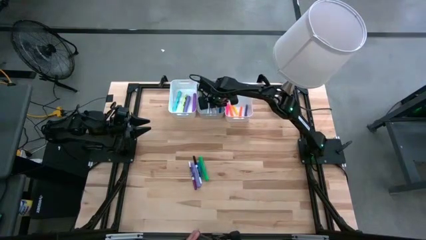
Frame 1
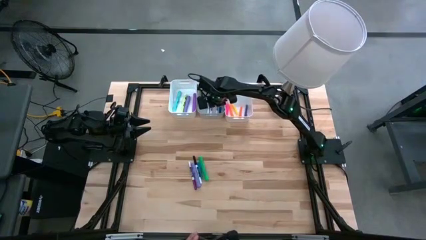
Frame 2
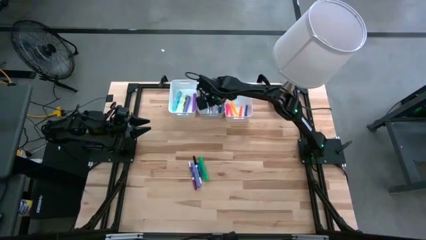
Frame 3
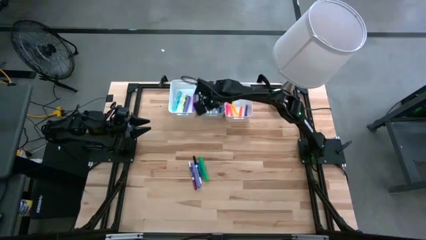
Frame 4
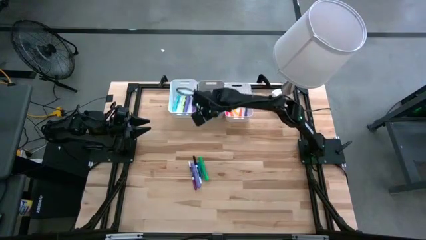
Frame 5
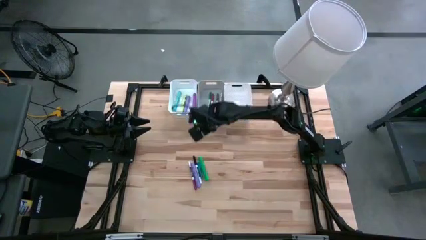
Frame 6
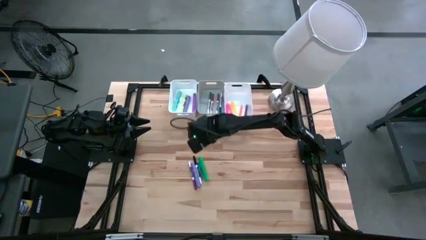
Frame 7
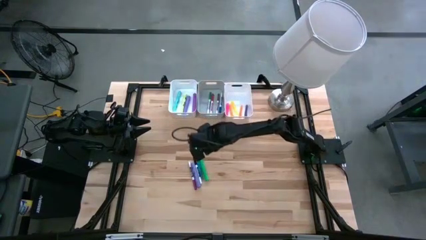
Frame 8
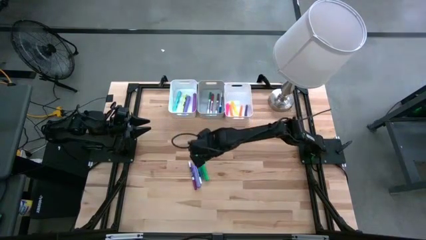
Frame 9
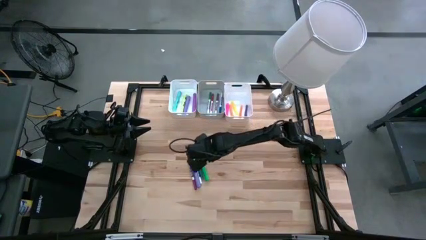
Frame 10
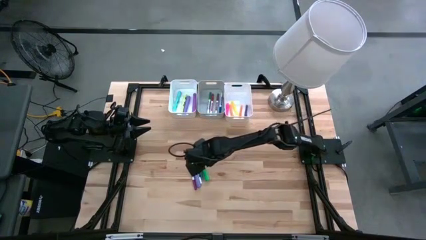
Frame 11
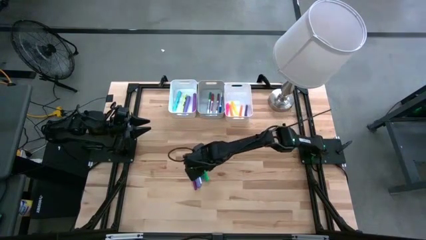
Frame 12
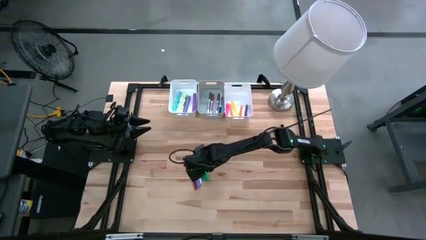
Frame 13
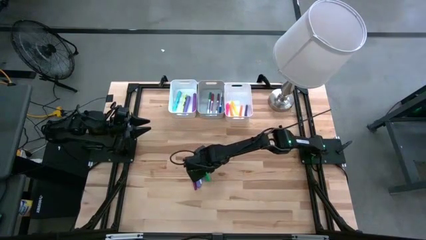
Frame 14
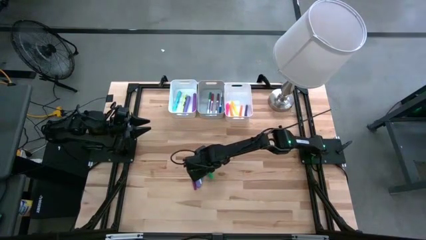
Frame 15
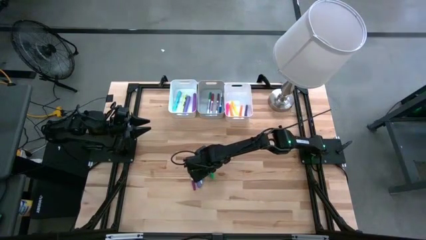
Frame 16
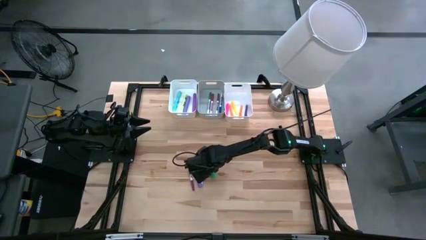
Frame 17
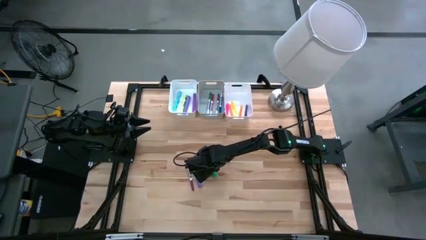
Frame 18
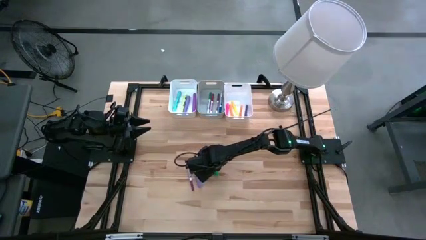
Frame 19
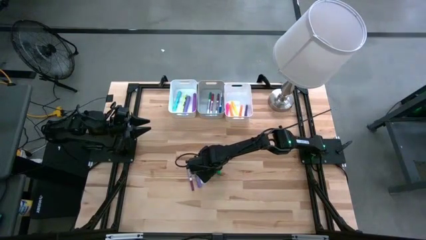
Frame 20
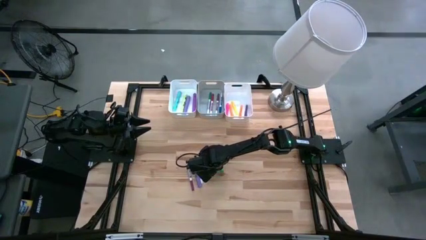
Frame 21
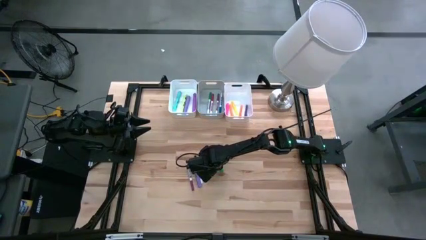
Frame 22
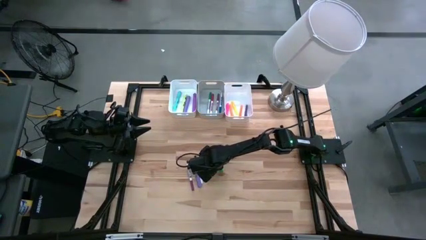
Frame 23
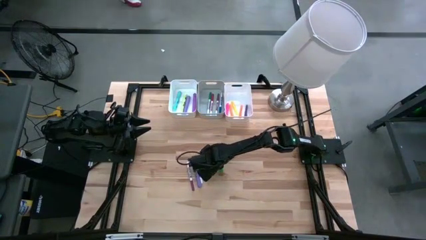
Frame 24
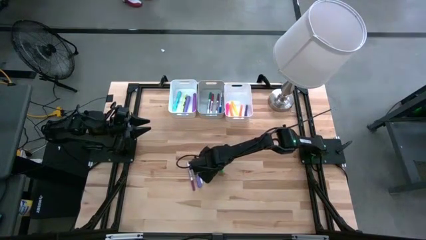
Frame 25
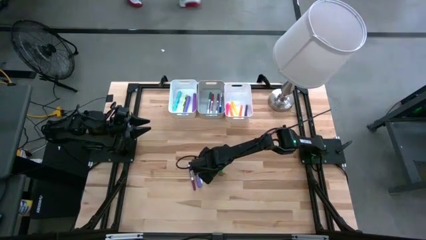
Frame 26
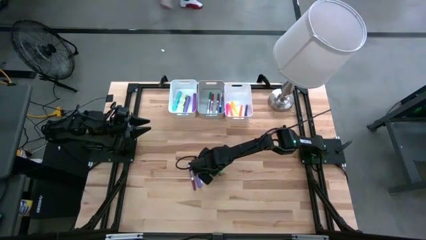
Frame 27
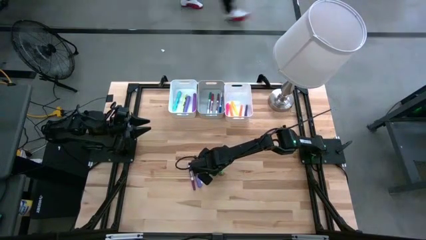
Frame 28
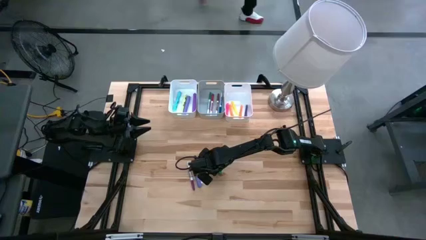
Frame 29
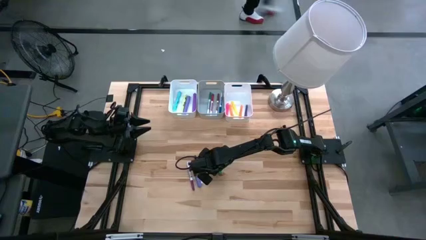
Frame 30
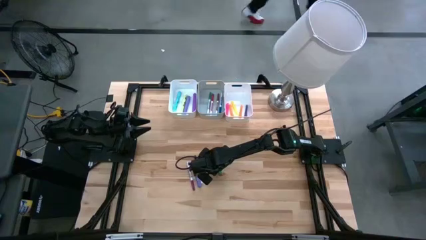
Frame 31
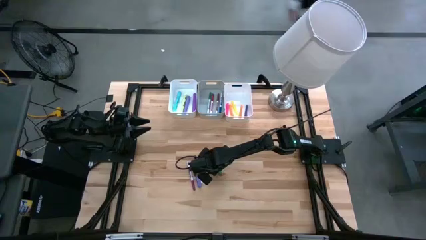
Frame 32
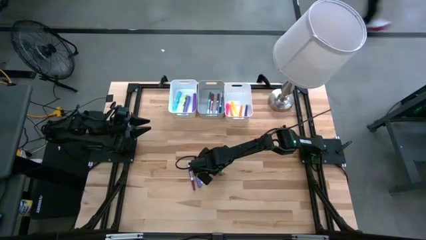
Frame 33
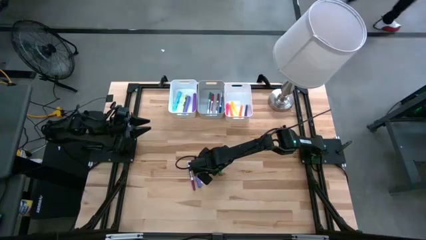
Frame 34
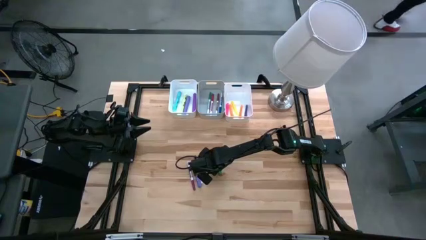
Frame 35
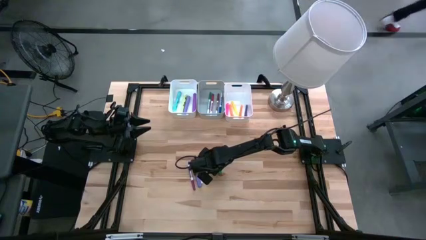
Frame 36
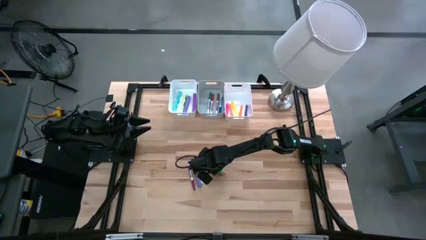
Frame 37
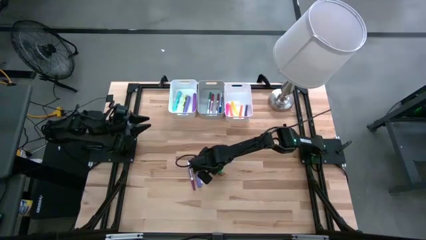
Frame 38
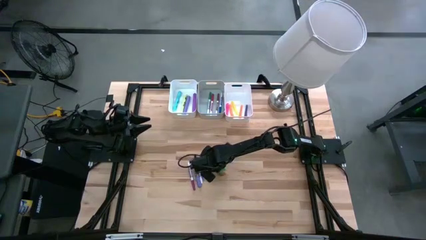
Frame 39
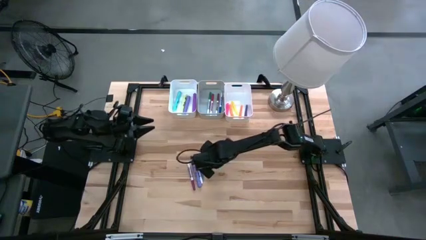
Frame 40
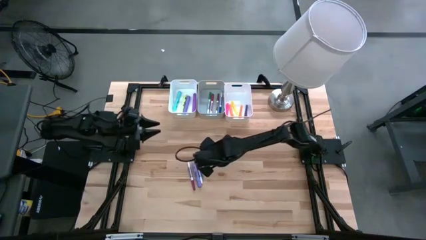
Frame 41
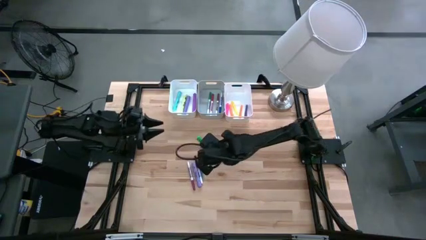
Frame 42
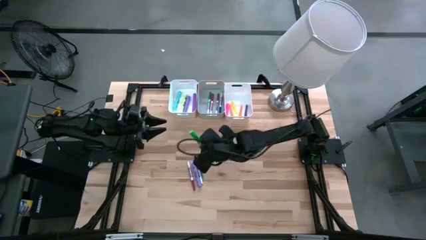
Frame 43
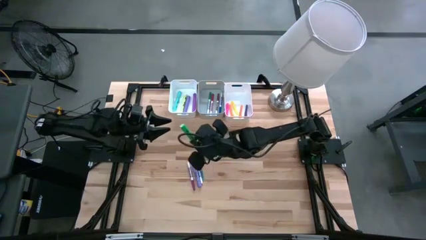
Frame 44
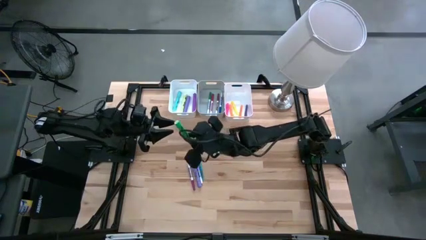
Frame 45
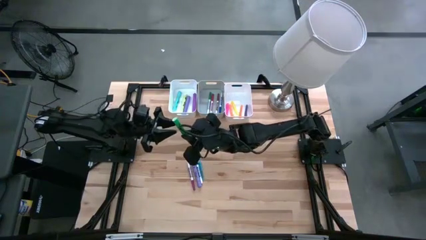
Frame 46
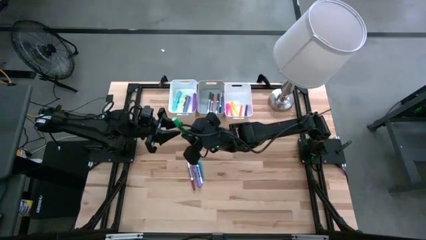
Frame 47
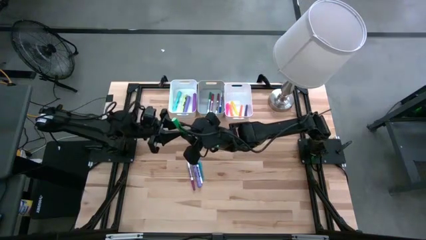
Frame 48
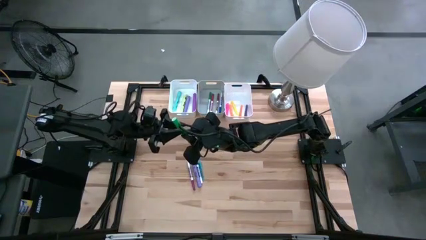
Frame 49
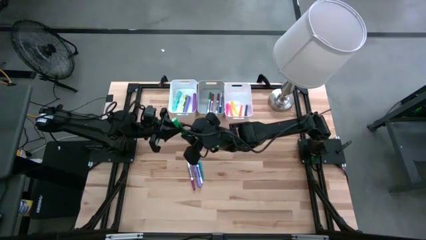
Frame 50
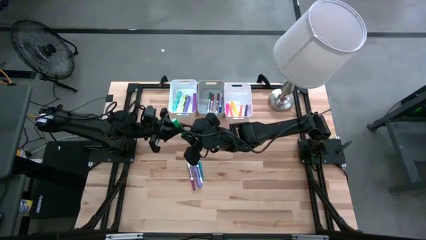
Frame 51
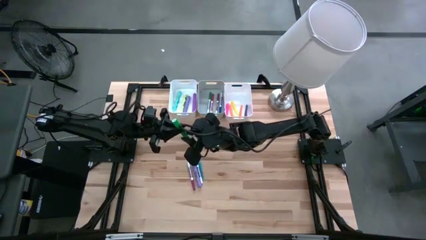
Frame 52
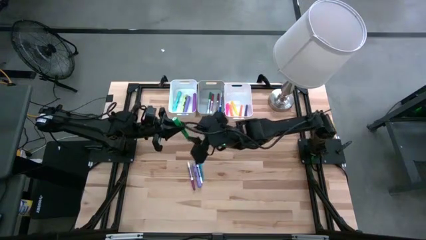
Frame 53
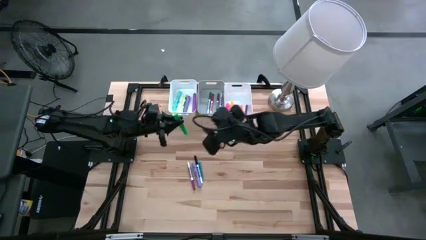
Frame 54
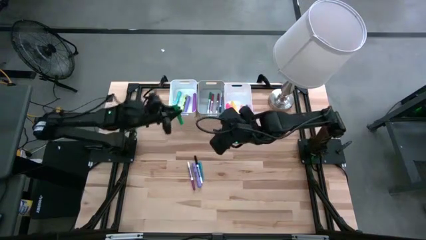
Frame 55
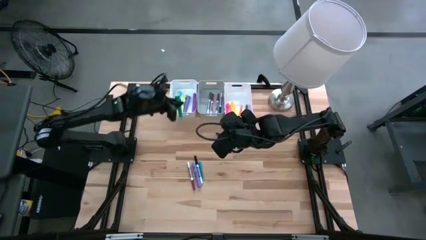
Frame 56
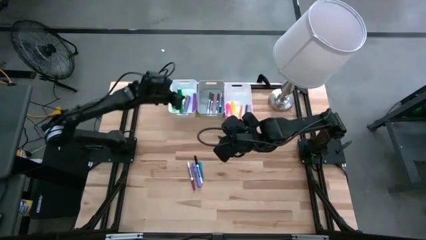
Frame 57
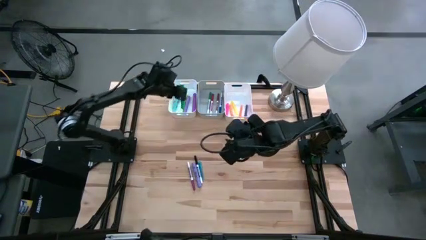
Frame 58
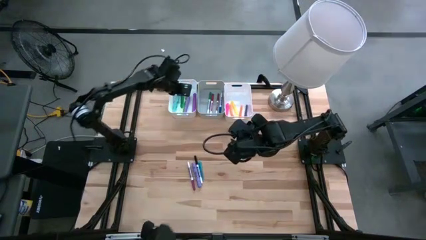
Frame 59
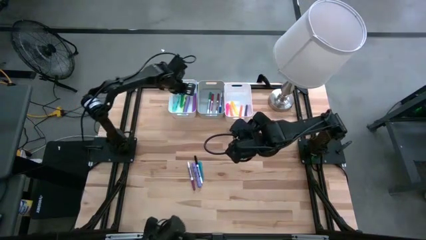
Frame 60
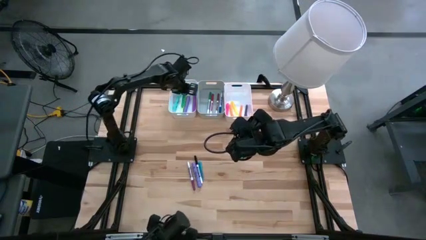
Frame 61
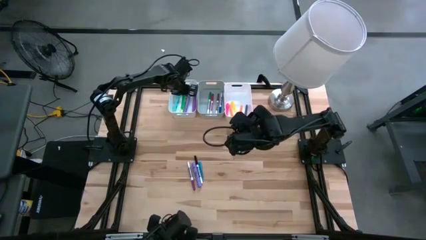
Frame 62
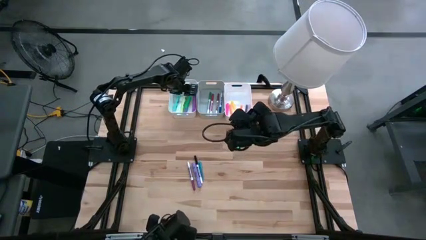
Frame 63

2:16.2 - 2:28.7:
Task: Pick & Place Markers
Put the green highlighter pen into the left white bin

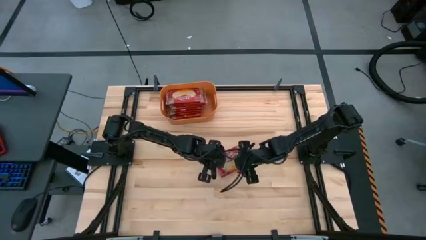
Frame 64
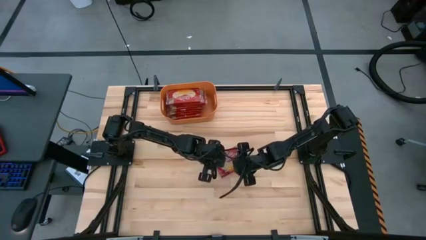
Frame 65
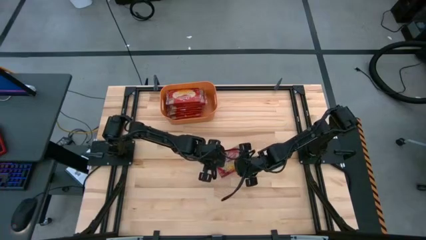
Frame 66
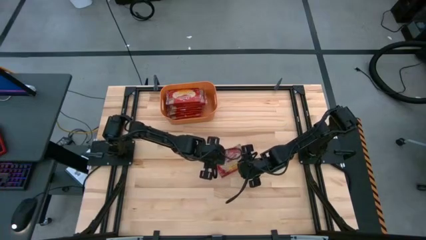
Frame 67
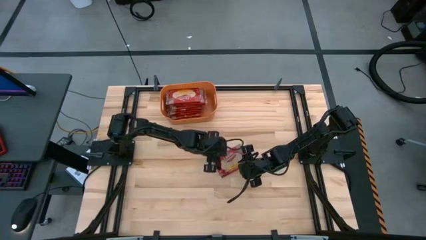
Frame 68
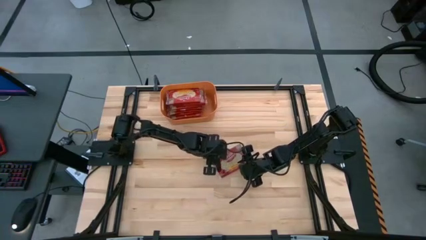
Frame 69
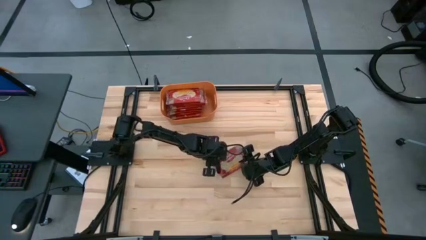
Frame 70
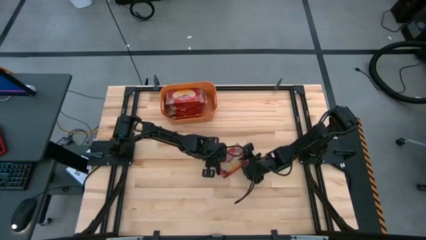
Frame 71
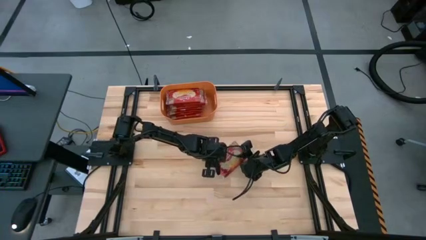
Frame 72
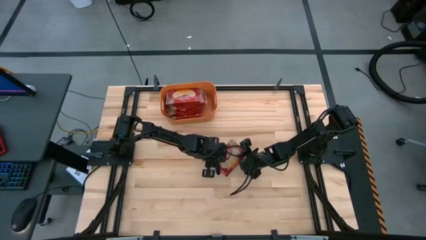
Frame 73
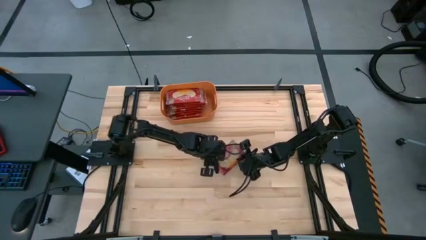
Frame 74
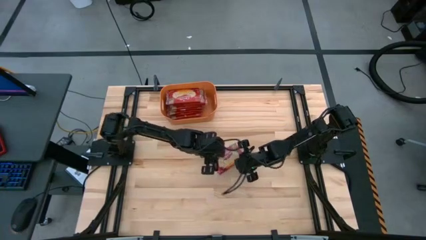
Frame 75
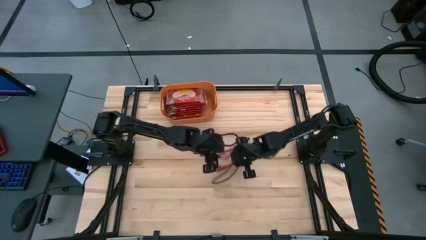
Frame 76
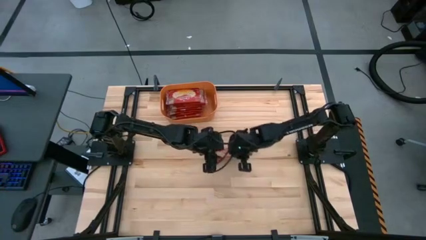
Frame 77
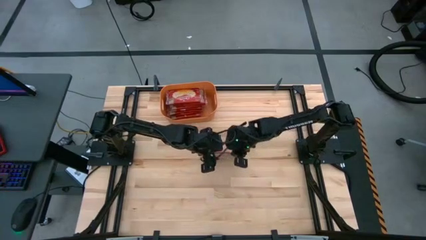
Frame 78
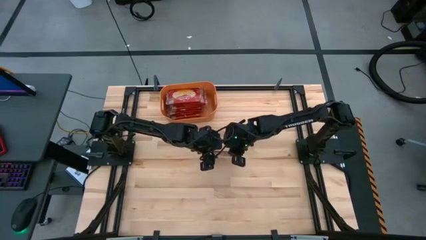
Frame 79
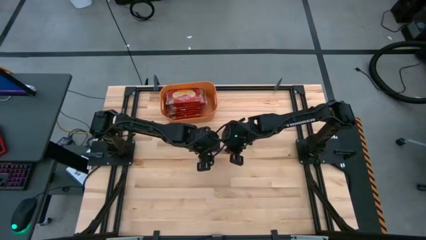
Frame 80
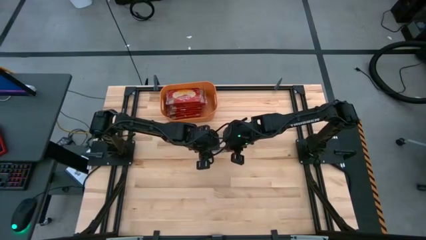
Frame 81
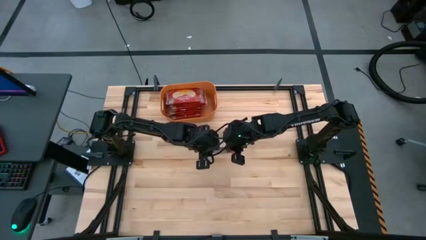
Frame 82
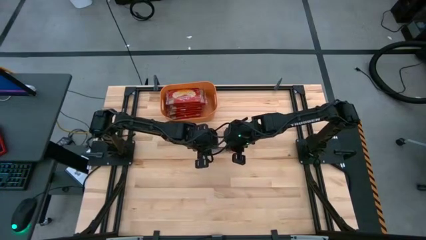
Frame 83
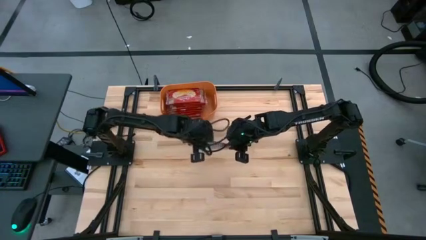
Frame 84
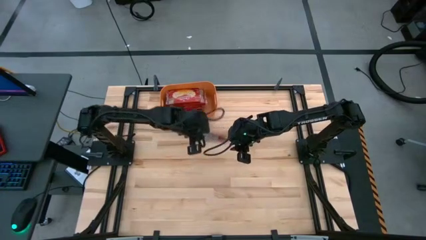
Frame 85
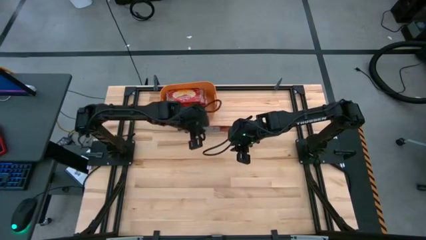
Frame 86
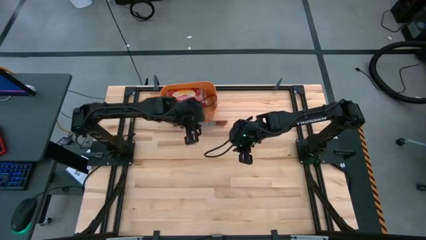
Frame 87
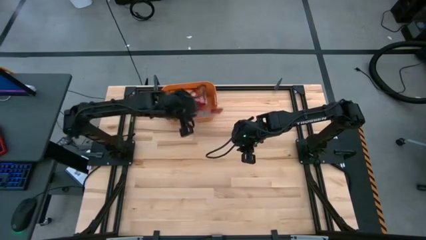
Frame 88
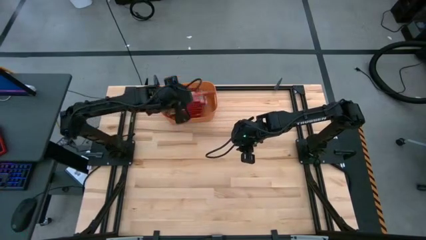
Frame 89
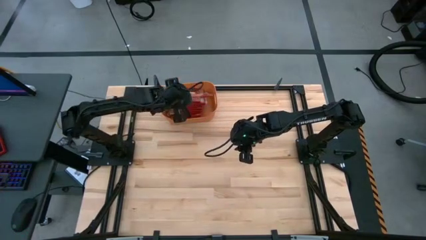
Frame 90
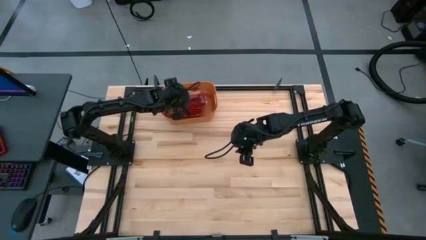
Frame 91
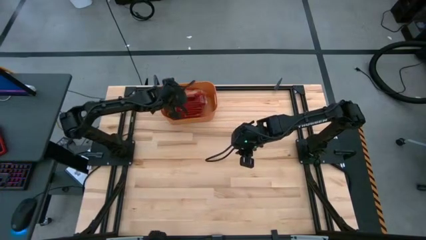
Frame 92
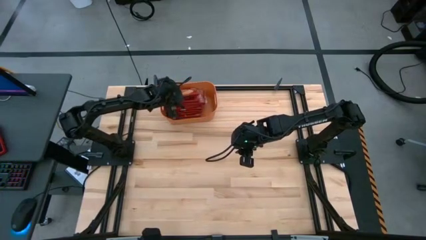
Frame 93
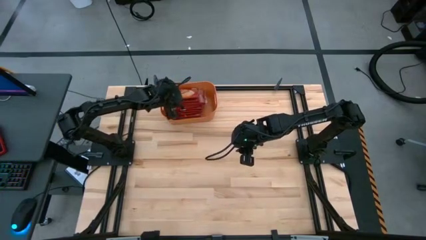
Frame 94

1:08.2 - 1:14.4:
Task: Sort popcorn bags into baskets
Put the red popcorn bag into the orange bin
